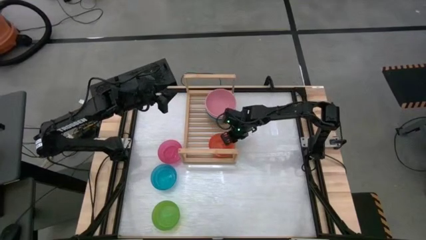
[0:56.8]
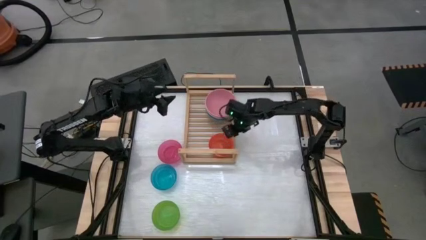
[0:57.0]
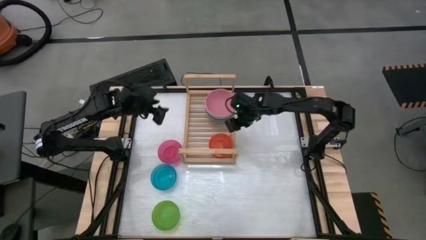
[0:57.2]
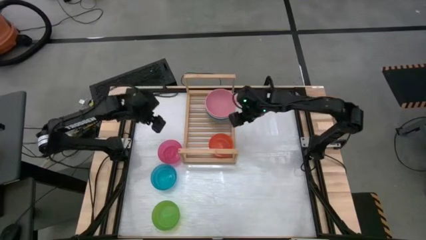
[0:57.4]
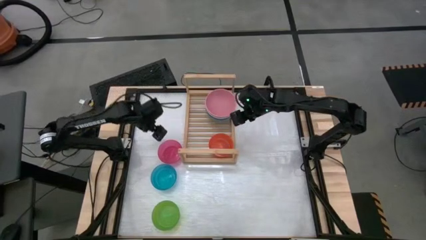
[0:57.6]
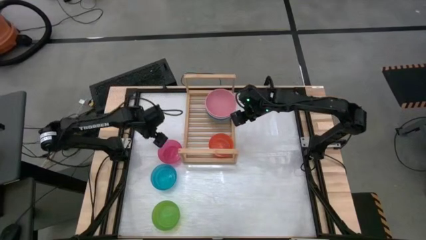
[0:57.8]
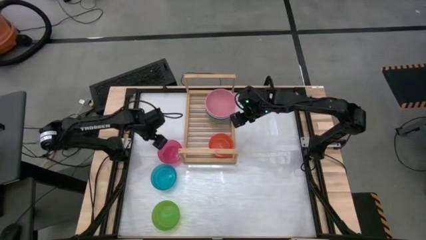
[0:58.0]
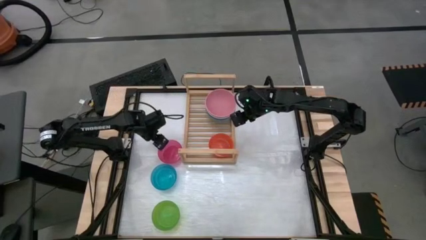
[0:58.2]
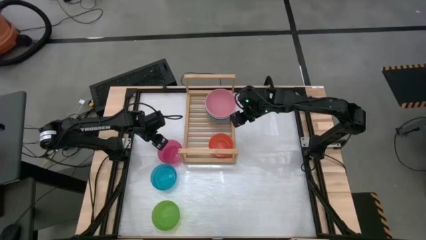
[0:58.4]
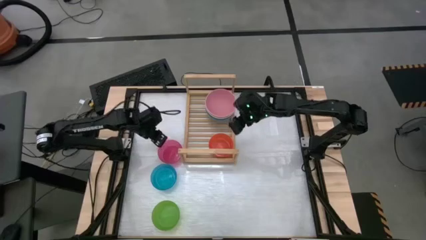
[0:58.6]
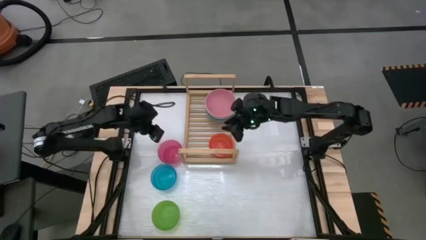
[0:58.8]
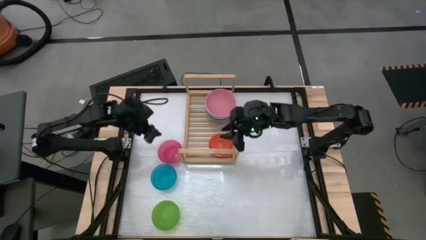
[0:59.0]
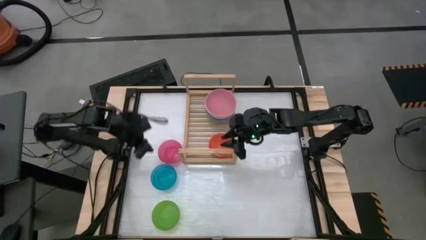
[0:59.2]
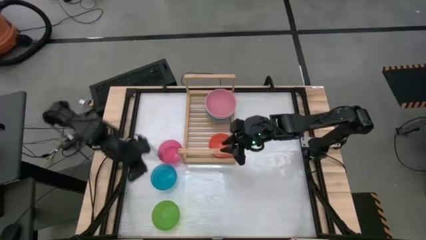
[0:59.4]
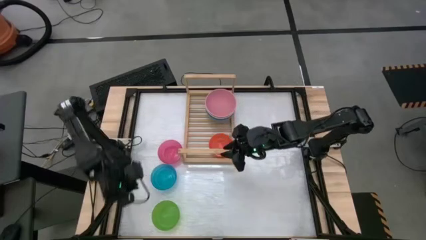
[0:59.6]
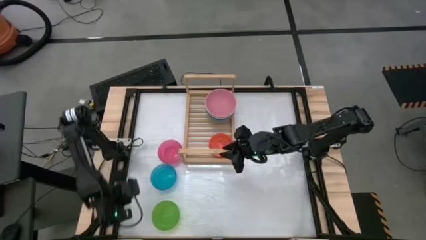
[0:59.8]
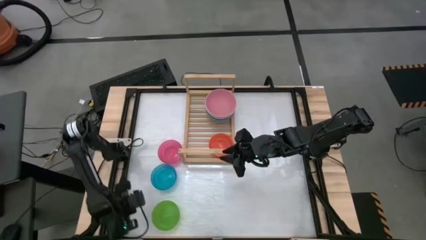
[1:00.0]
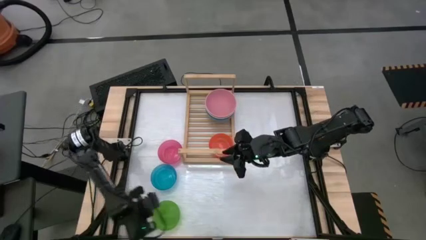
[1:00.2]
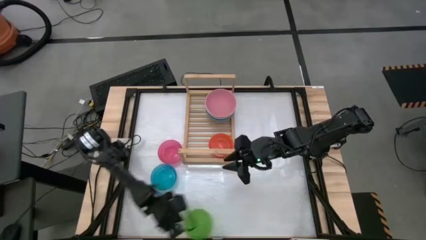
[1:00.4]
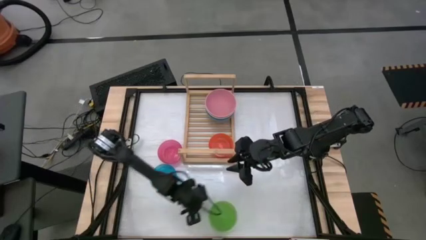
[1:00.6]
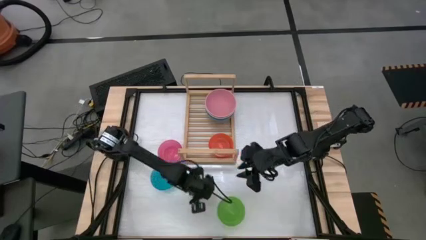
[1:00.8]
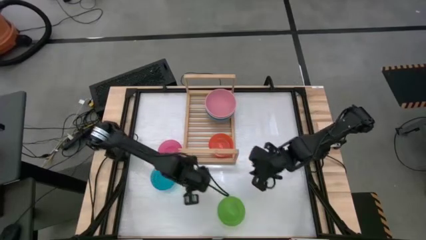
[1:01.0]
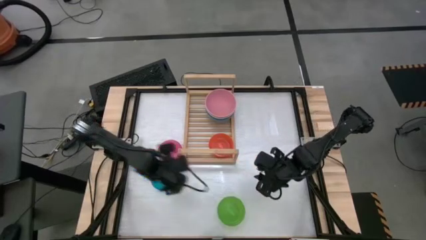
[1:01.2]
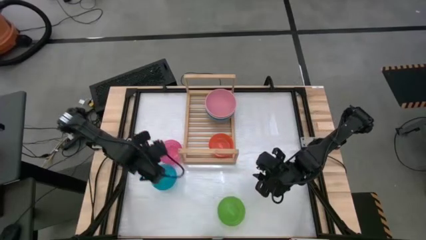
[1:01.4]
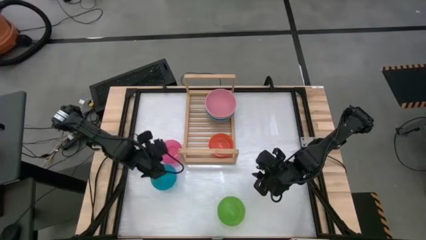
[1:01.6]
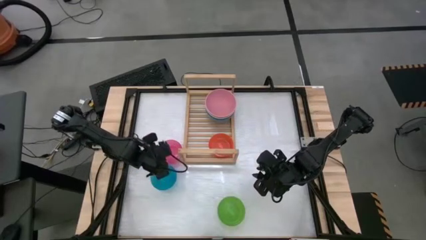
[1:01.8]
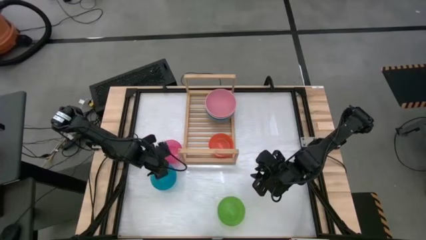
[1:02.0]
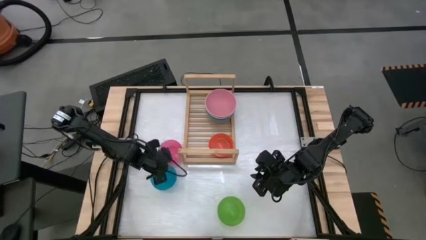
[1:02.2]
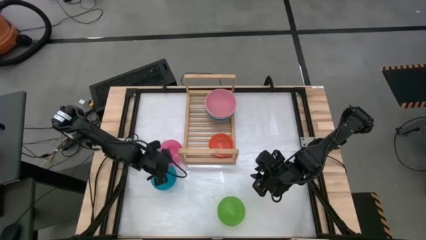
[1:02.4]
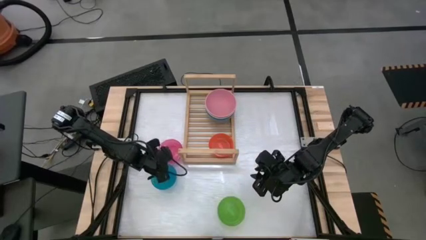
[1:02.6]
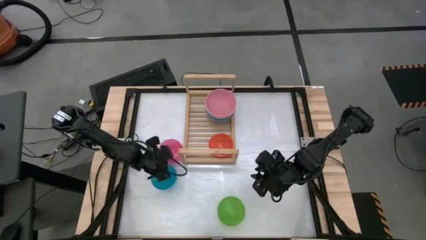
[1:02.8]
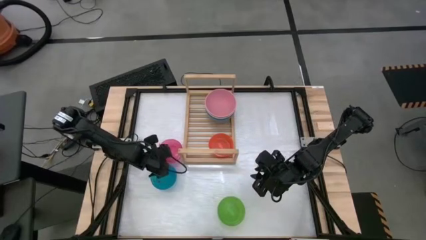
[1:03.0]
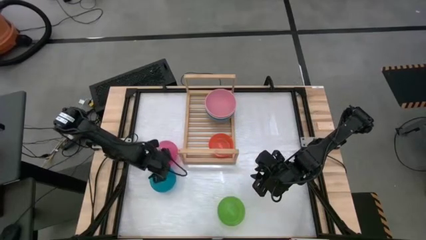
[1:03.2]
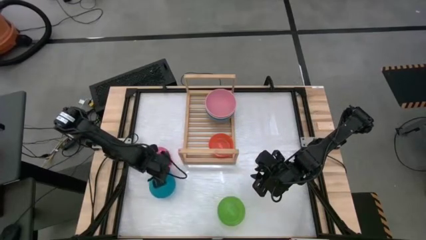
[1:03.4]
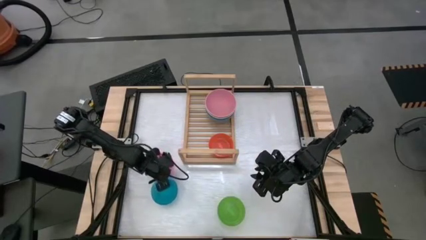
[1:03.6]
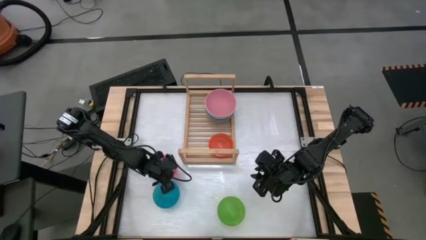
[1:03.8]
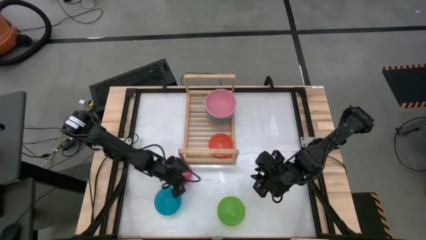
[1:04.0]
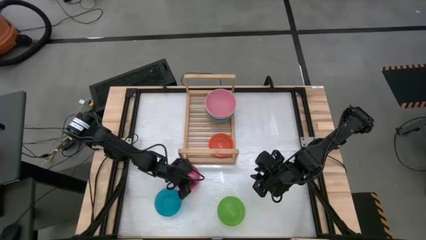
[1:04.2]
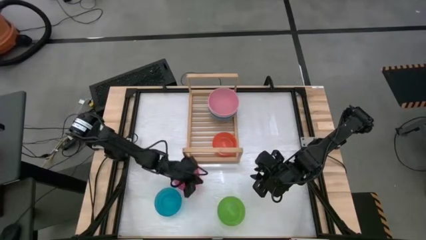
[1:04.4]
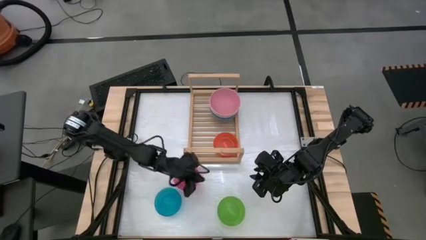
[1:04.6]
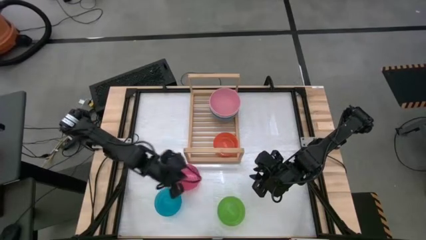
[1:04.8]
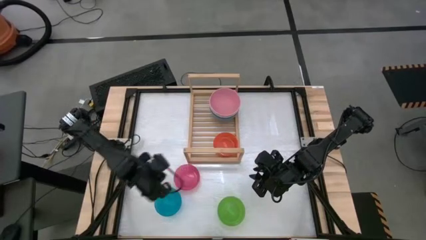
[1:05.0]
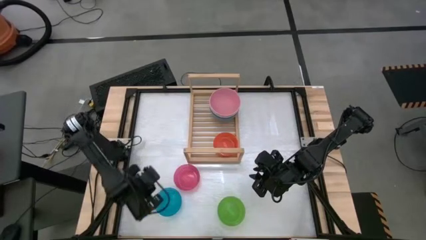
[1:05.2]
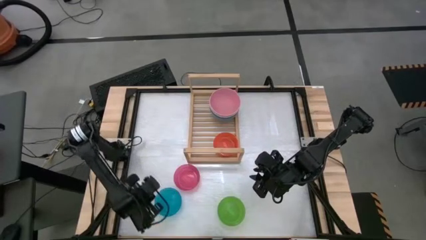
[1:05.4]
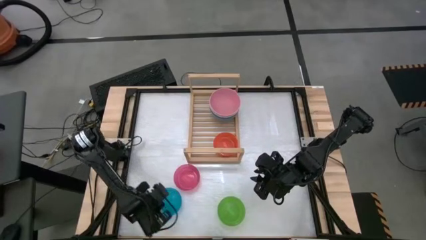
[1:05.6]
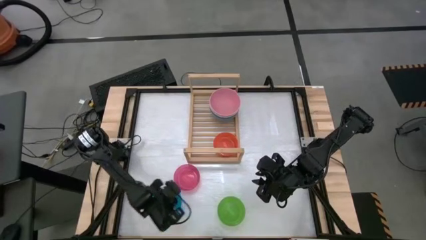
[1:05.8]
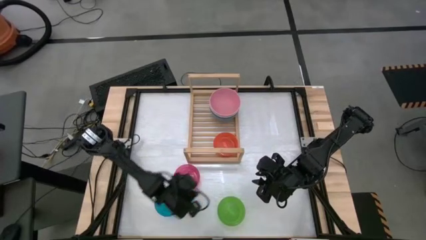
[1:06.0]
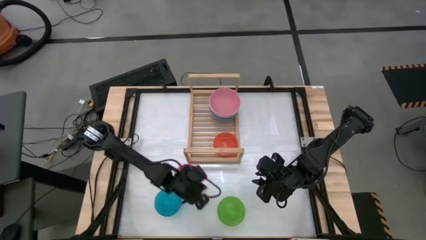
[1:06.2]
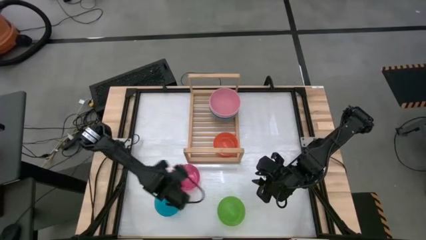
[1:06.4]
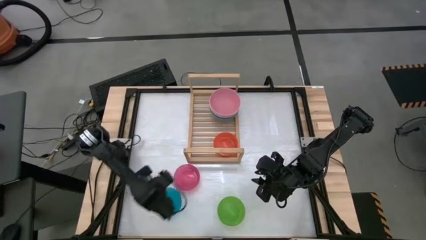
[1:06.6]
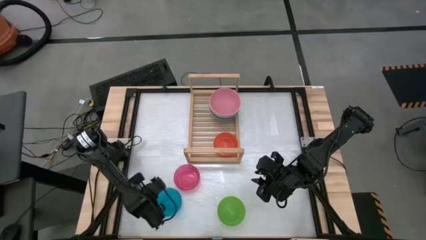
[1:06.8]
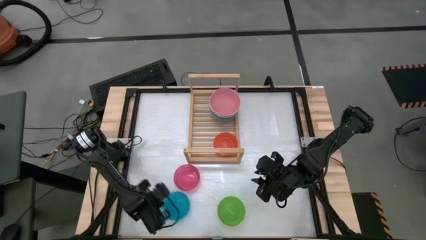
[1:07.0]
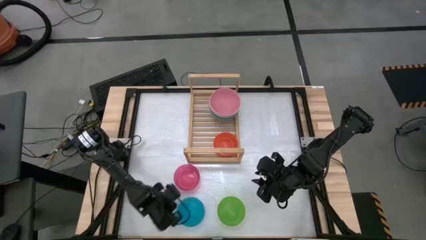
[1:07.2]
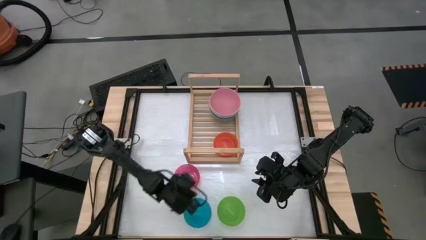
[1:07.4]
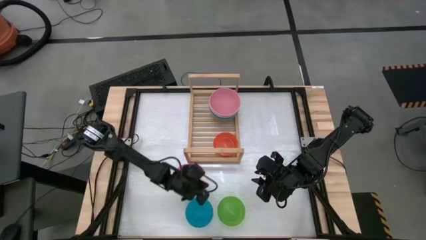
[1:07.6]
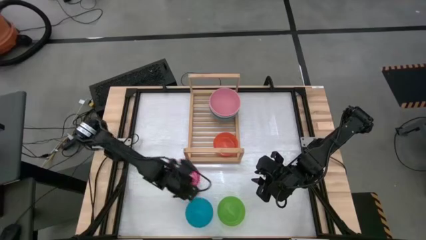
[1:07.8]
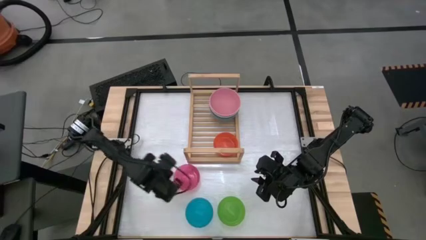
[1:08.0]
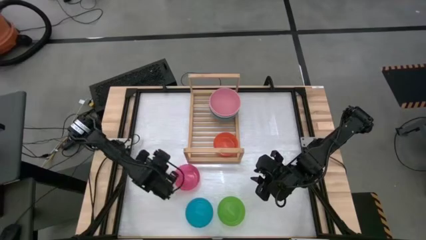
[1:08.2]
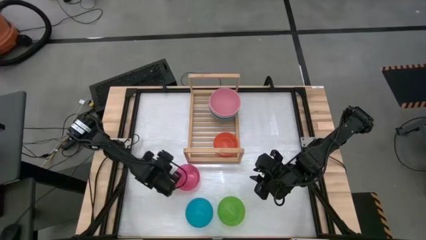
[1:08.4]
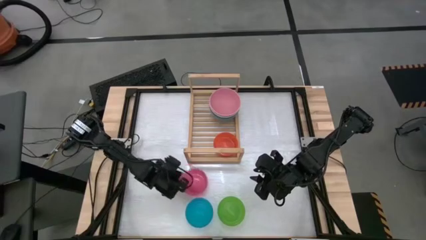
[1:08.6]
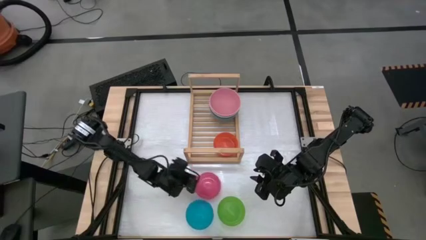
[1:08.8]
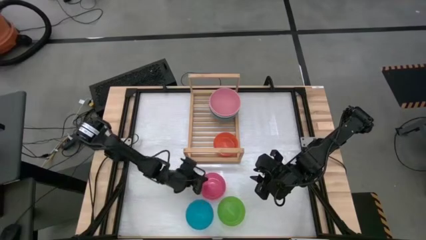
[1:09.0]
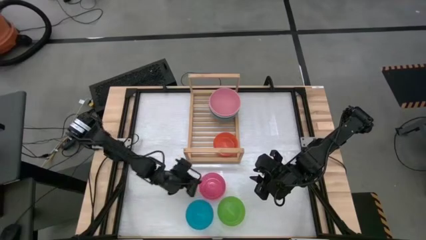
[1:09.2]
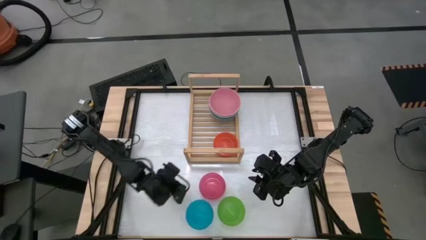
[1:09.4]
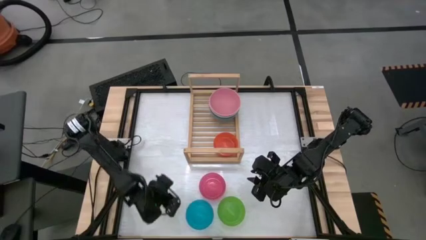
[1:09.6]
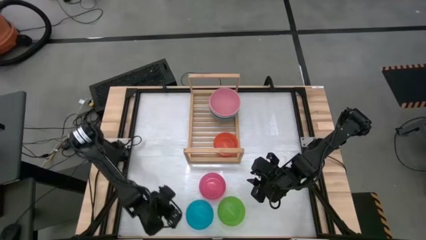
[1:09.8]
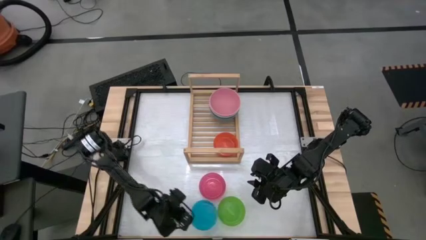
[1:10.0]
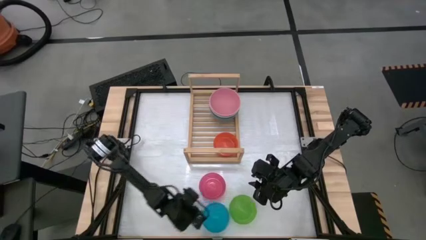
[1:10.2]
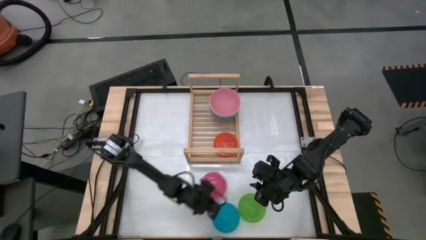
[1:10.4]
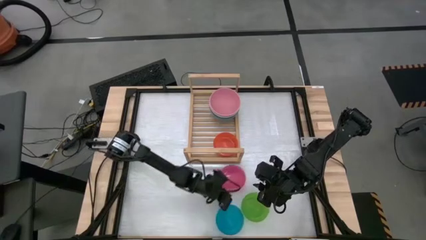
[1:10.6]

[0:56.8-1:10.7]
Task: Place and stack bowls onto a shelf
Adjust the colored bowls

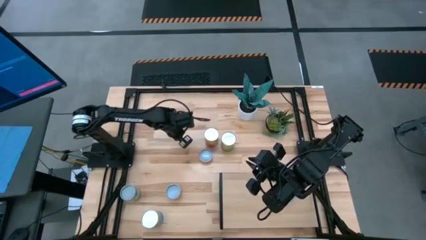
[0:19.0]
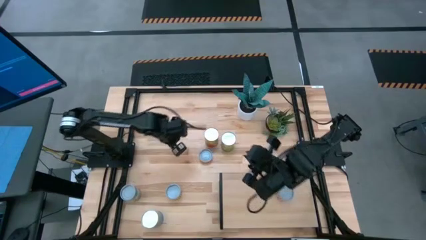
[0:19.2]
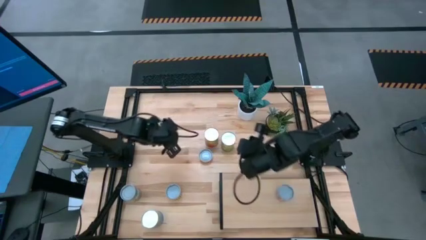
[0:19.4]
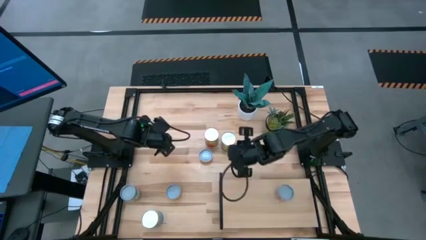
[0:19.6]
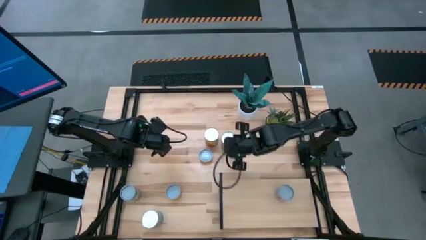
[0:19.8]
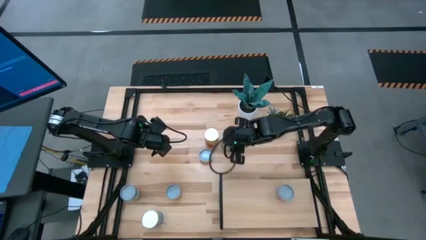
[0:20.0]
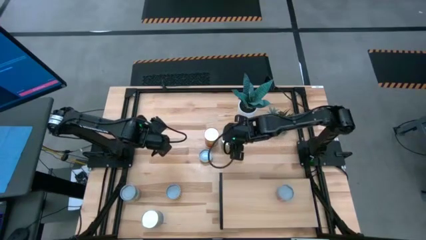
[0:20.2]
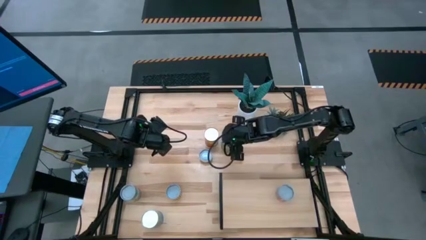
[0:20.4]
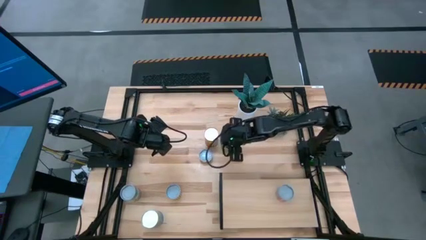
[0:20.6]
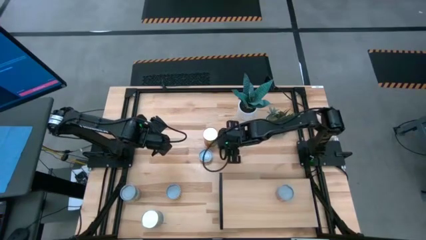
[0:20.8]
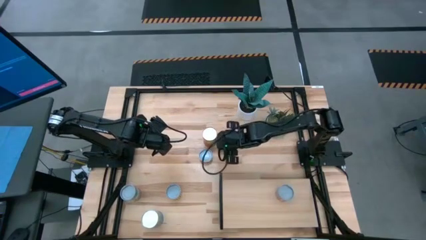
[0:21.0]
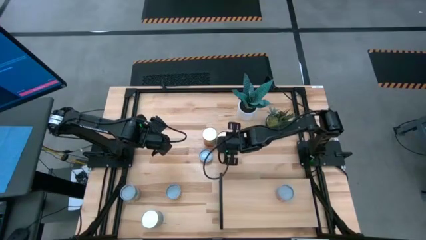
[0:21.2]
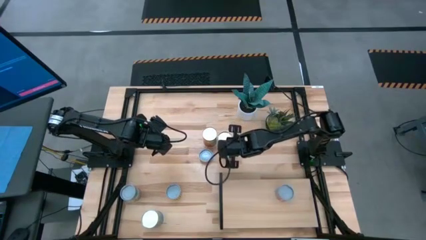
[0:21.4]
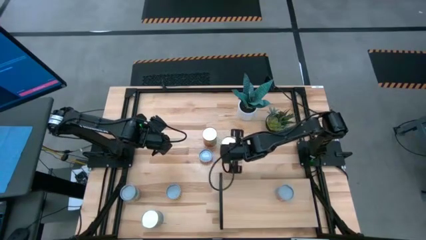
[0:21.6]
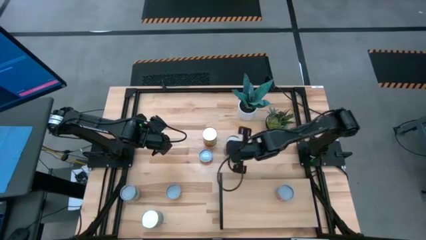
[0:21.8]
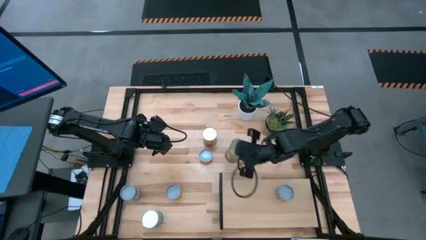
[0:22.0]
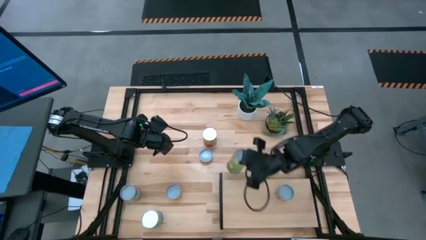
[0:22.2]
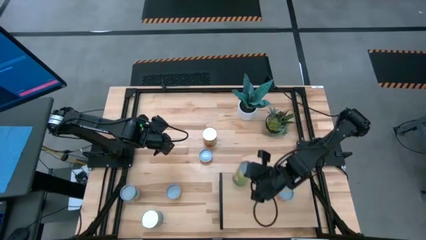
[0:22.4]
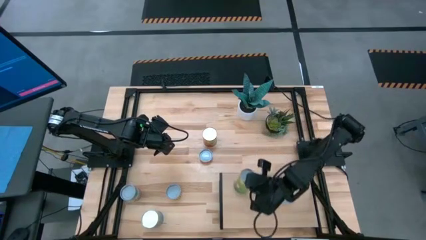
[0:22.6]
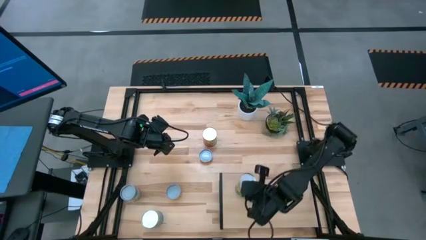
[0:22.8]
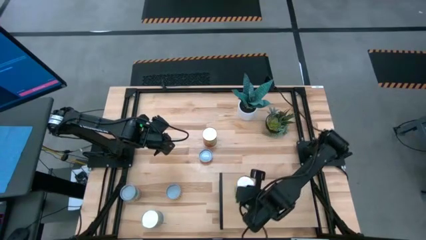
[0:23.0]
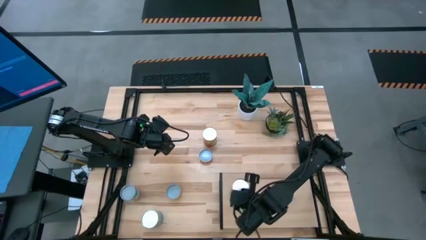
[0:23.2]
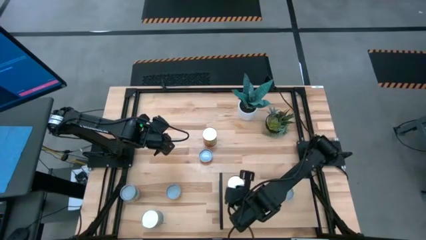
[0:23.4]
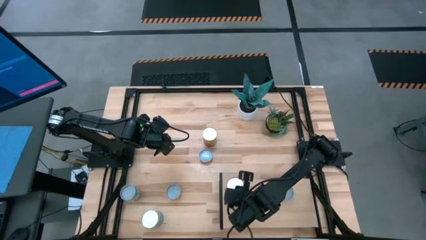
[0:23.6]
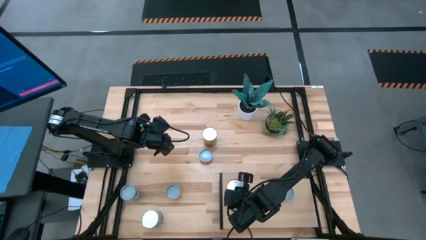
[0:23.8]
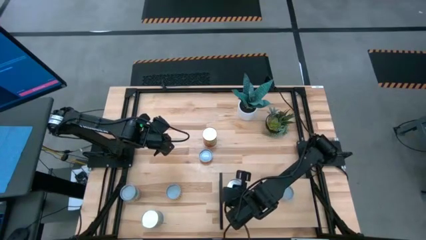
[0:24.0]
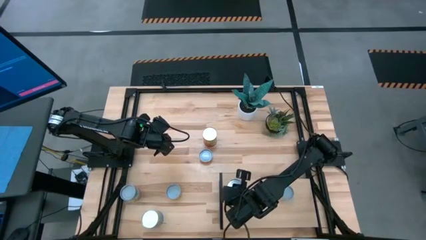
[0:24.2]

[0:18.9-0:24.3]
Task: Pick and place cans onto a shelf
Put the canned pears on the shelf
